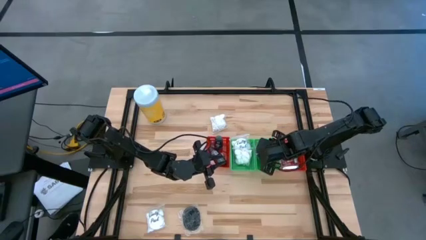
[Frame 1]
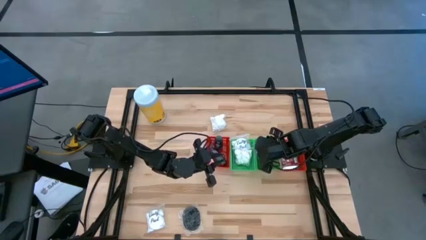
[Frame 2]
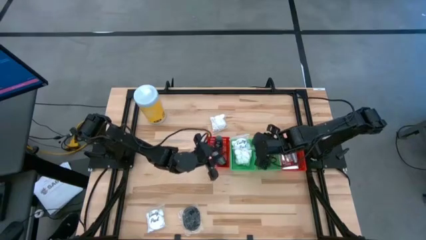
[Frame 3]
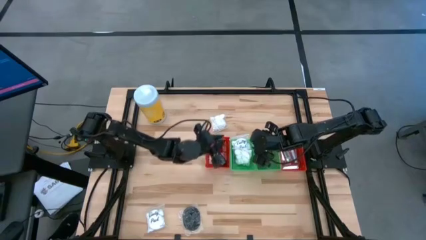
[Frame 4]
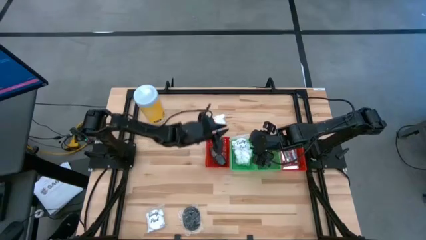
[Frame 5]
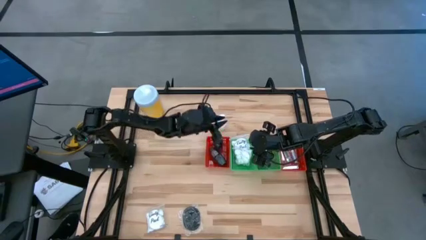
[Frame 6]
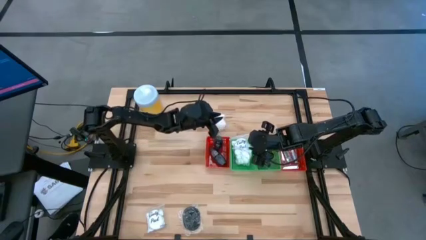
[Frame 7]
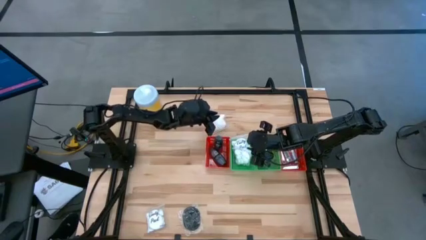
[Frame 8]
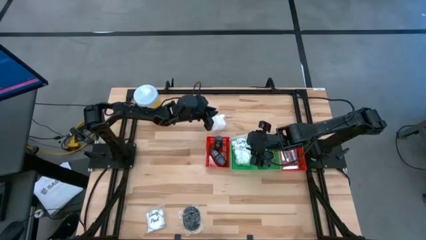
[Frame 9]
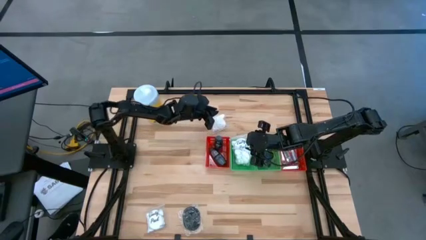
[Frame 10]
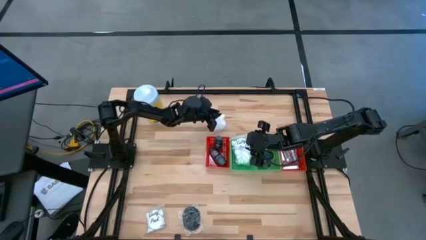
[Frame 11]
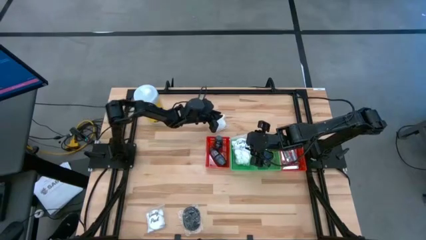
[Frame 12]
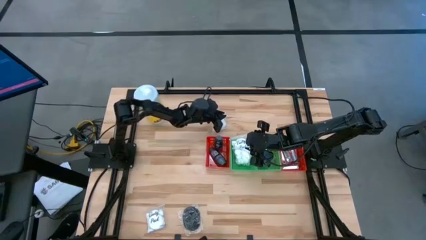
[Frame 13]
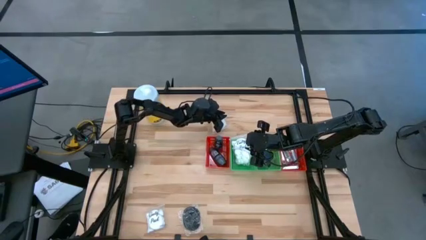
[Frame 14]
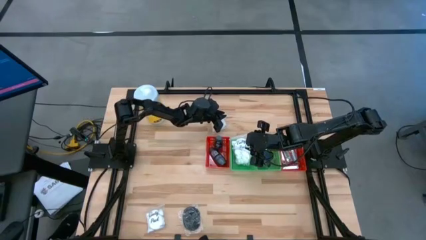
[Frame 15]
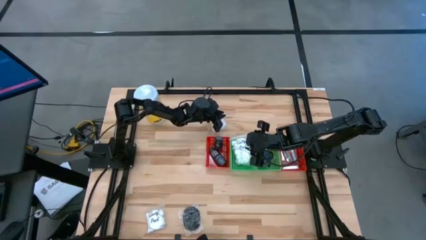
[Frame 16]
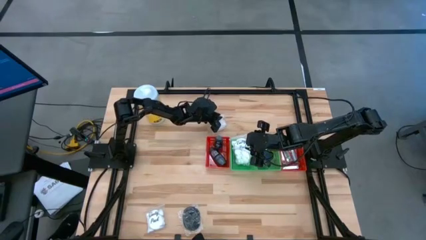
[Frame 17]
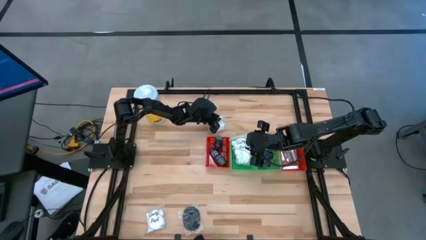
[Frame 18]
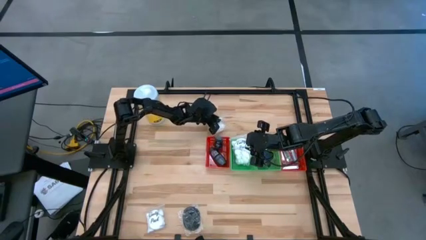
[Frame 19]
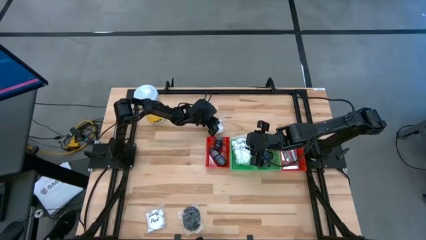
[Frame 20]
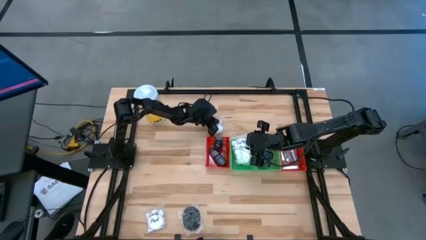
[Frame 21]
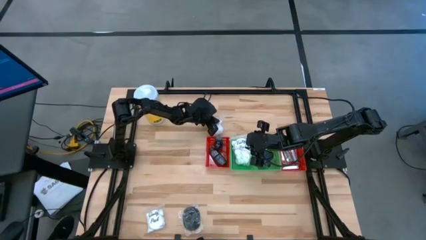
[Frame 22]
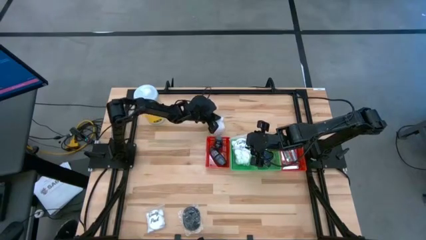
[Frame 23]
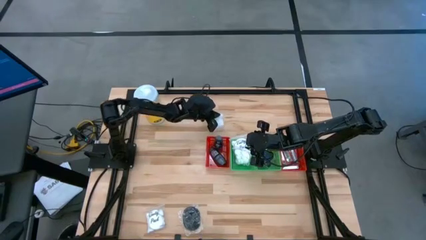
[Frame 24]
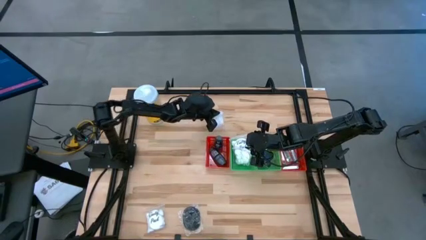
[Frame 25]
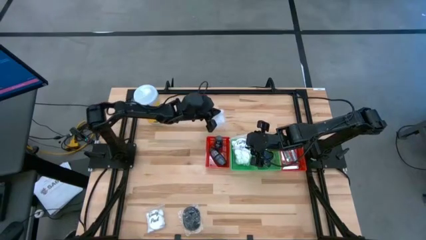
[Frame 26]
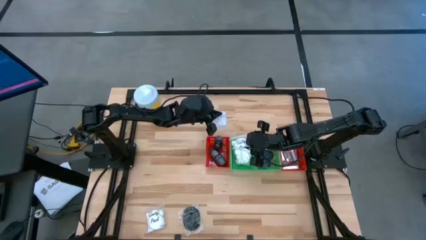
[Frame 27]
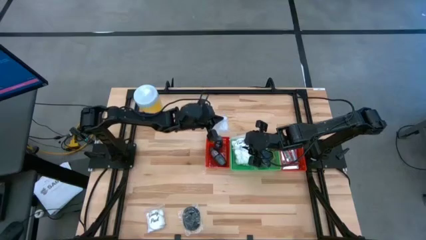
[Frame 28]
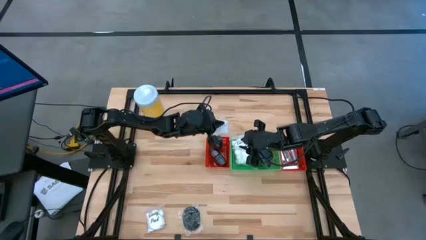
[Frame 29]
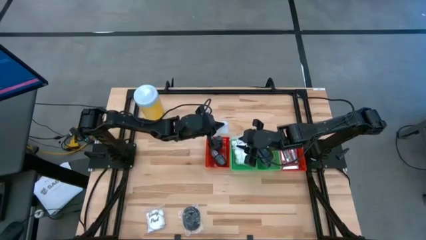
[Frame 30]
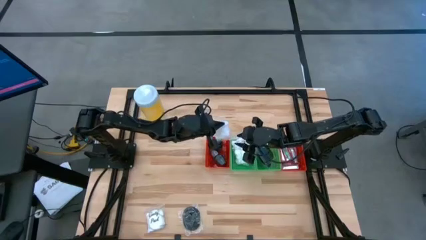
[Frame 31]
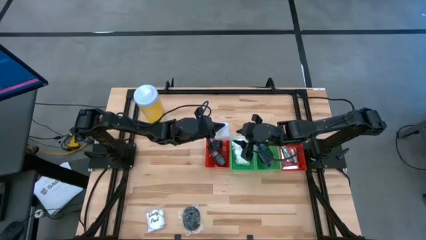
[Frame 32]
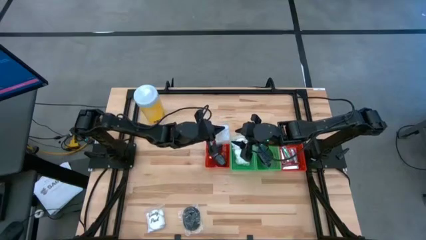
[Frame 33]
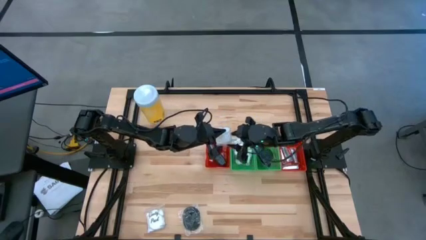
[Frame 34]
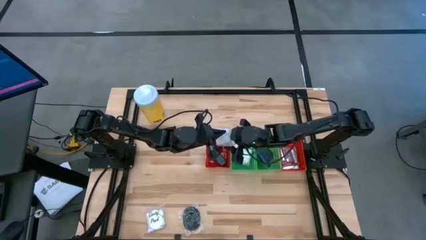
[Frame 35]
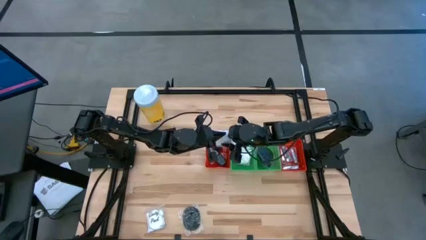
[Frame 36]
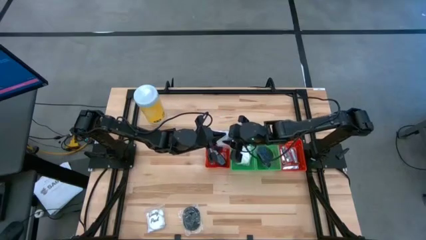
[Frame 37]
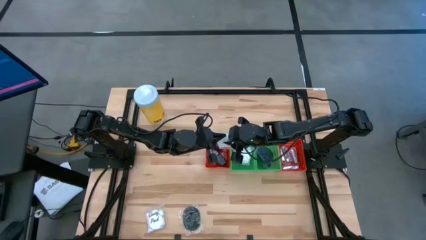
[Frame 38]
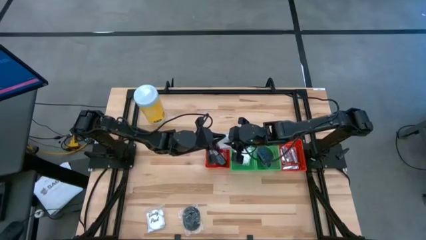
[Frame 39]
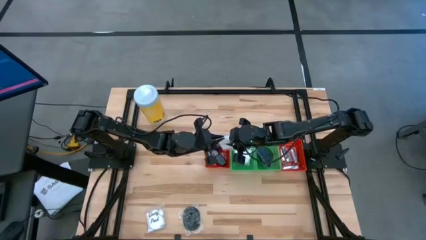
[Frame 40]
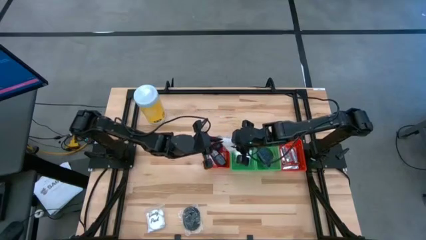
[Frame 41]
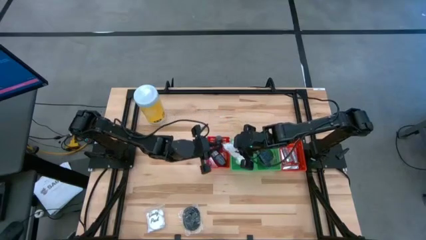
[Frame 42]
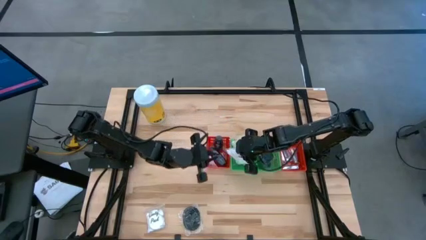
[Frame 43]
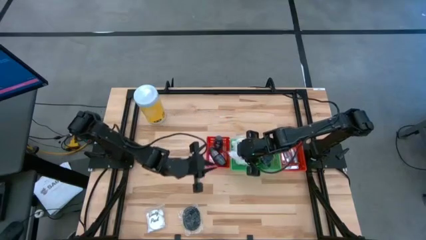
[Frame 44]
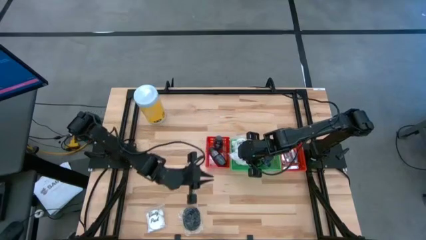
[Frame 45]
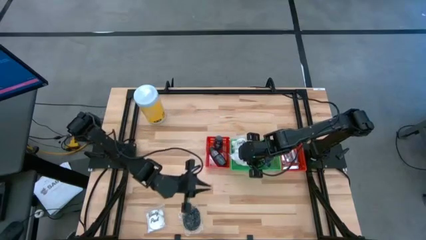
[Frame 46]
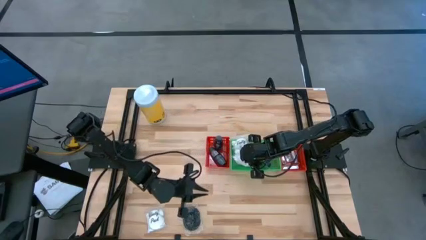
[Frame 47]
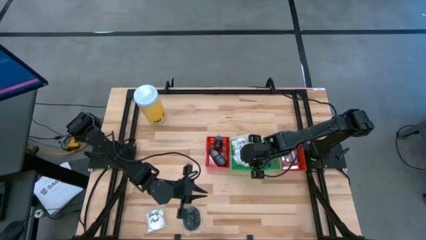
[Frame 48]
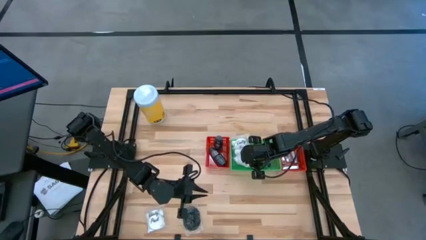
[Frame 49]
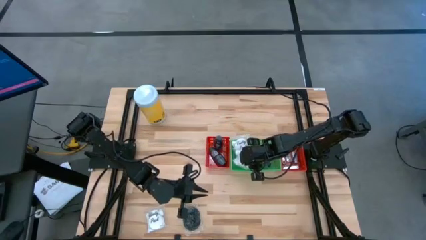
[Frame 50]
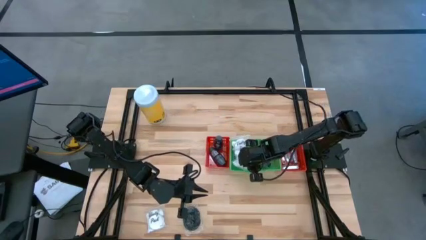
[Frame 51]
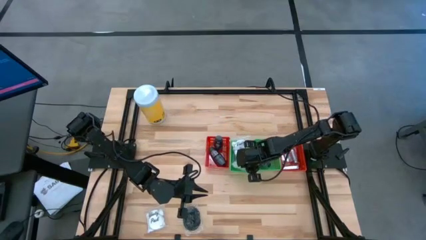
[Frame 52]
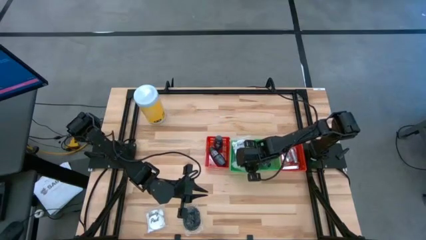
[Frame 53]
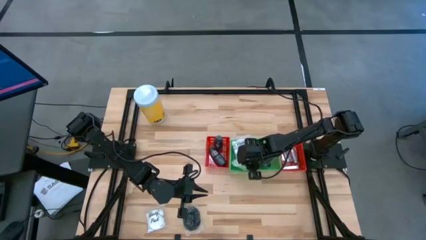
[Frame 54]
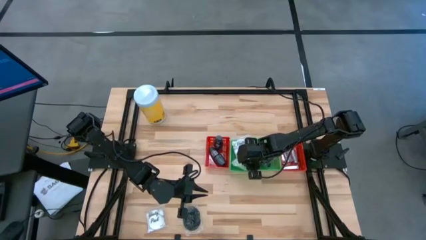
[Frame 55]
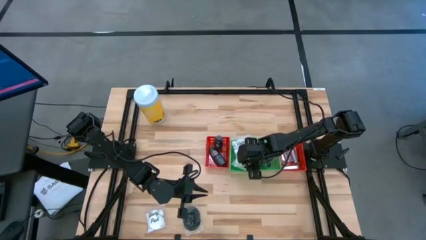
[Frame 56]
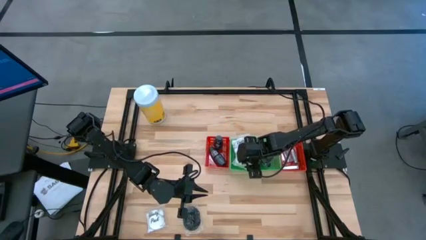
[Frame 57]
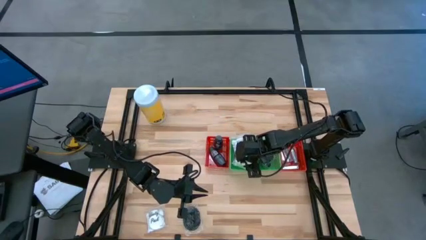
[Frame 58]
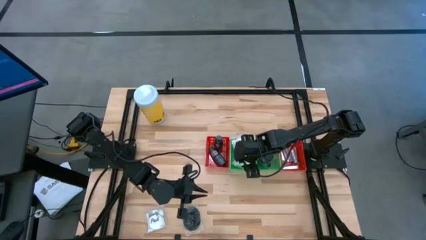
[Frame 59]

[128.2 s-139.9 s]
Task: Pick & Place Travel size toiletries
Put the cotton pack into the left green bin

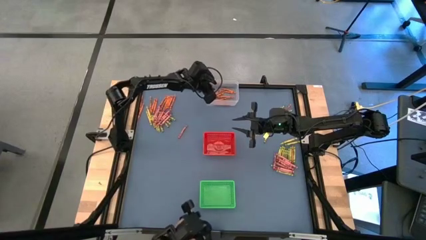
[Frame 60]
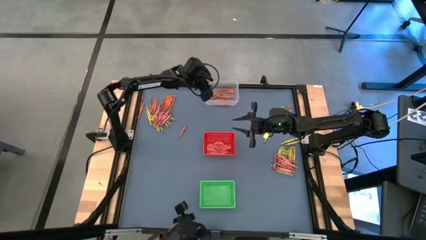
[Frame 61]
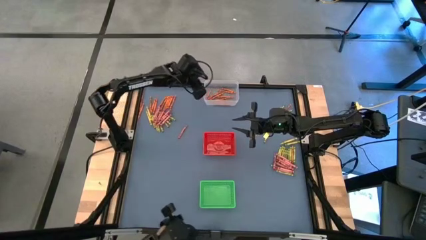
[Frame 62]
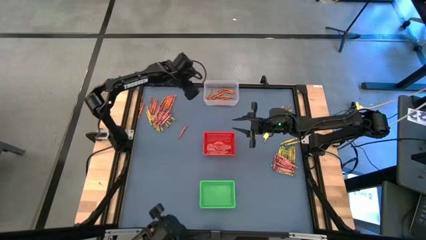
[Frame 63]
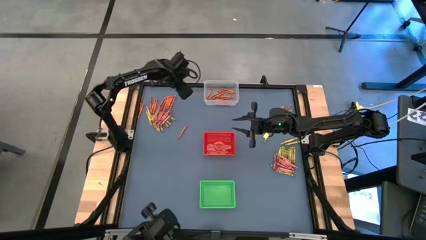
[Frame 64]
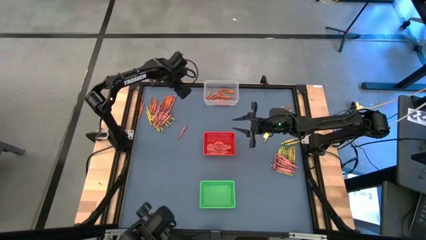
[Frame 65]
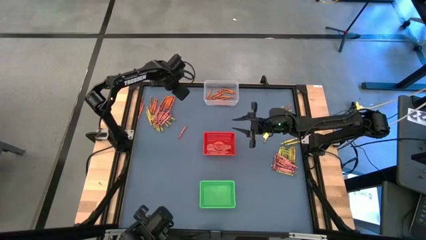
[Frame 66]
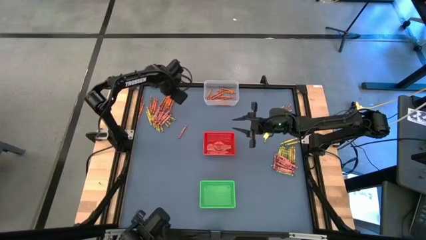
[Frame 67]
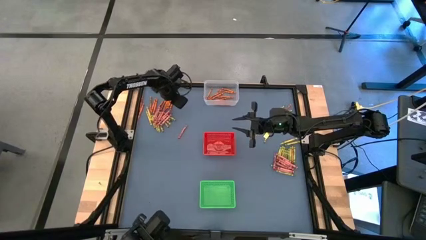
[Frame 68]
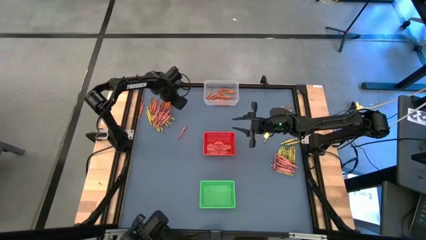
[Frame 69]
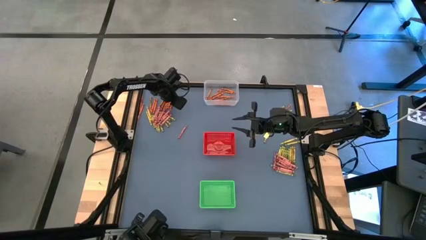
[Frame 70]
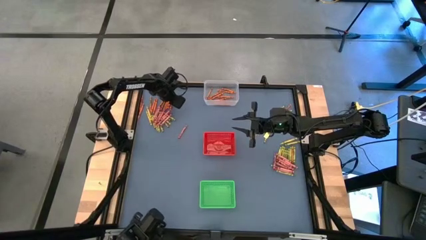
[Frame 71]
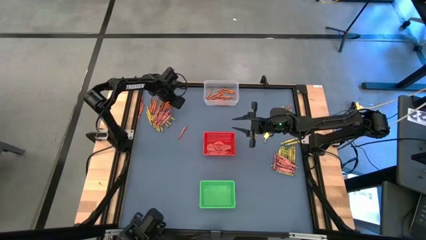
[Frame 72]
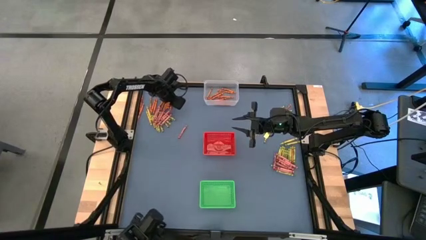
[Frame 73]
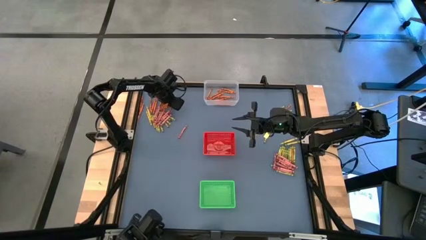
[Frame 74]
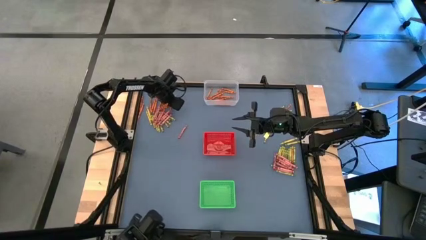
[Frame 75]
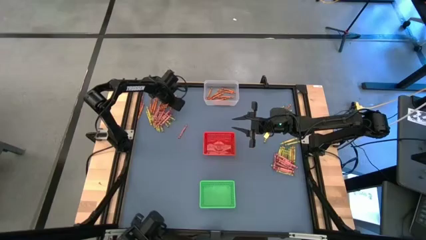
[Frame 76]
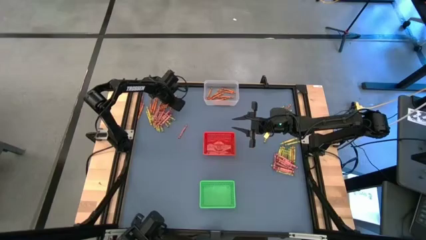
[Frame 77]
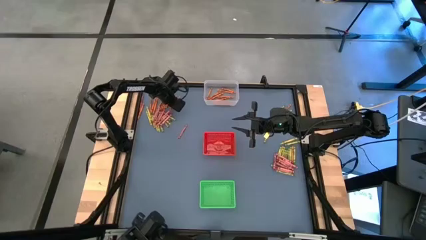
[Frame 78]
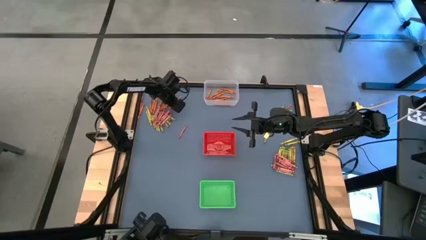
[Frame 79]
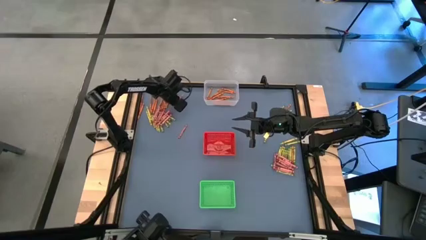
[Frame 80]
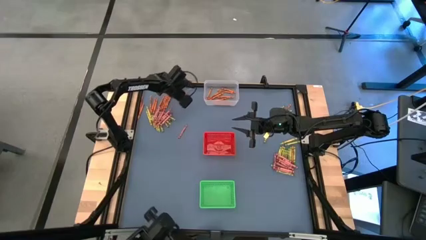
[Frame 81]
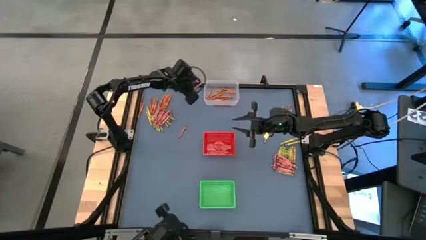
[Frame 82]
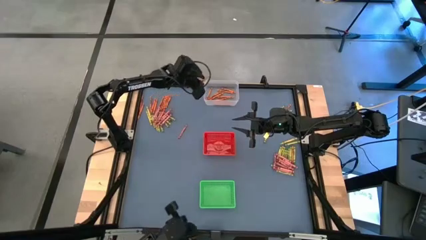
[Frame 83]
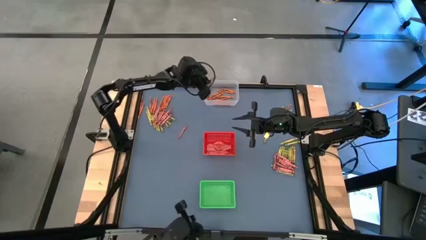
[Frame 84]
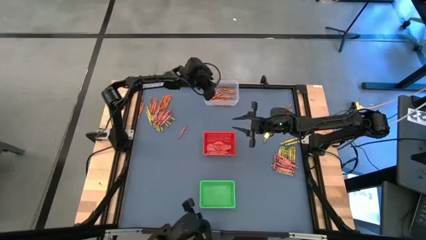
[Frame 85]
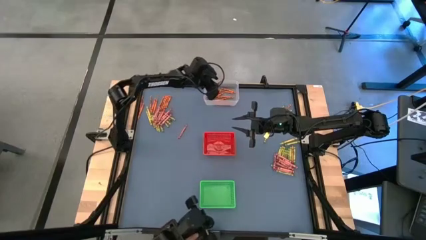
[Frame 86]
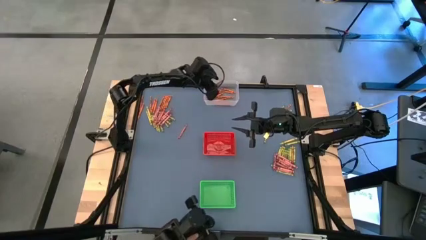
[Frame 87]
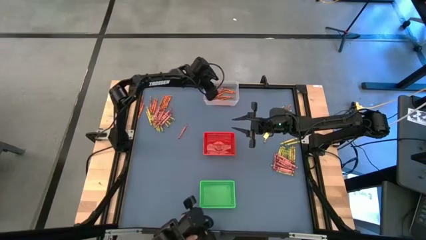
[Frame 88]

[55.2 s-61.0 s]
Task: Sort crayons
Put the orange crayon into the transparent bin
